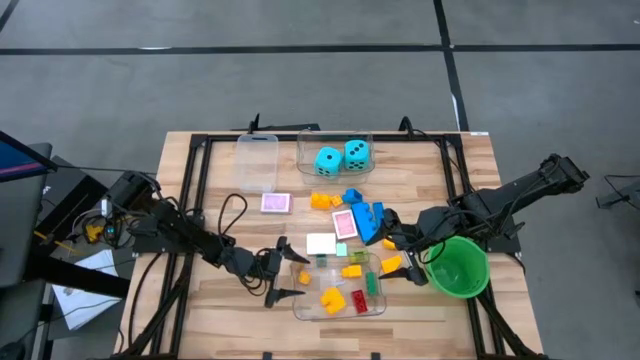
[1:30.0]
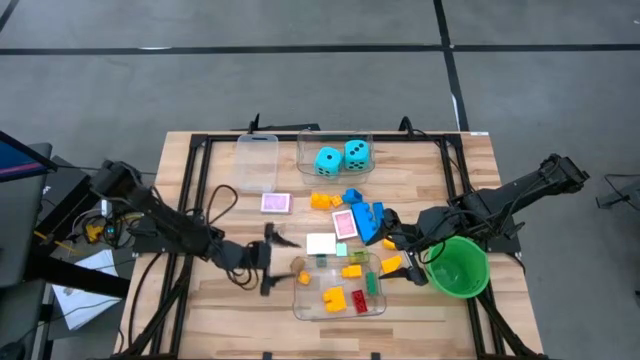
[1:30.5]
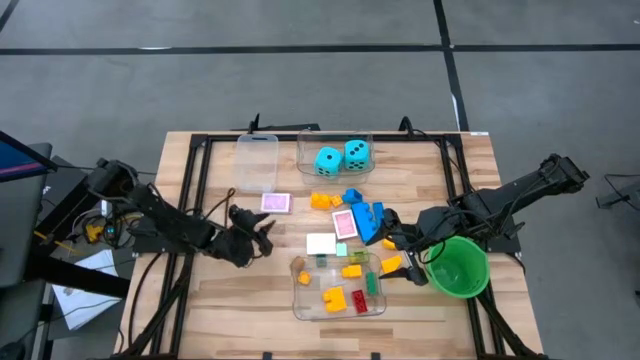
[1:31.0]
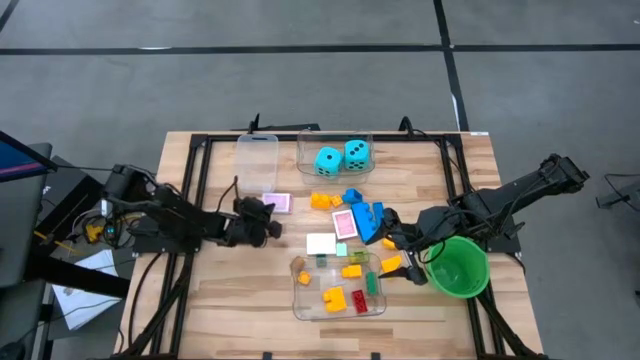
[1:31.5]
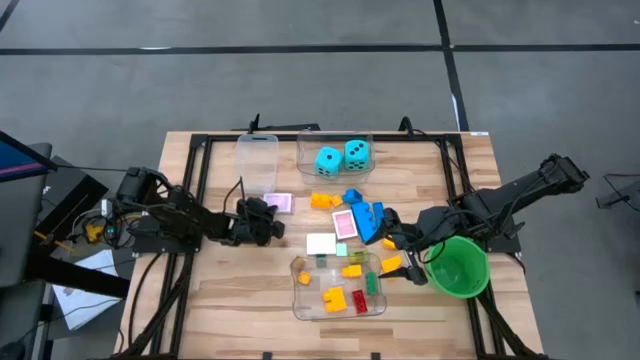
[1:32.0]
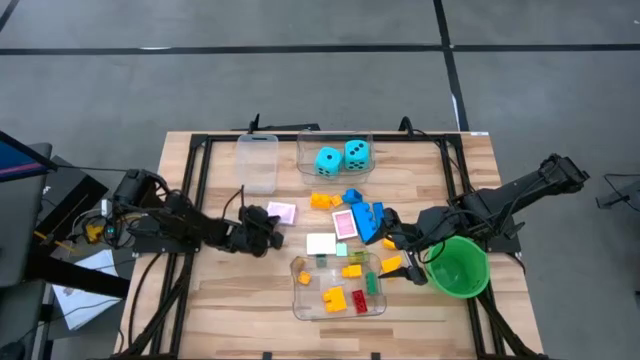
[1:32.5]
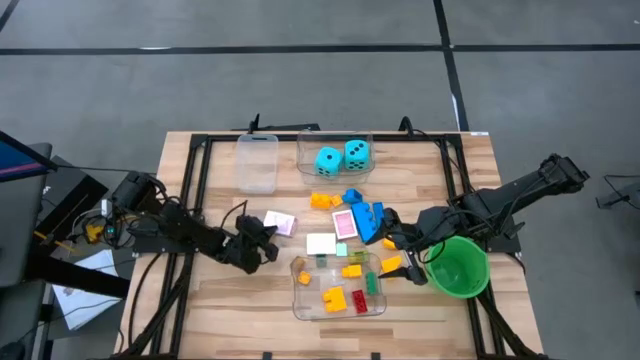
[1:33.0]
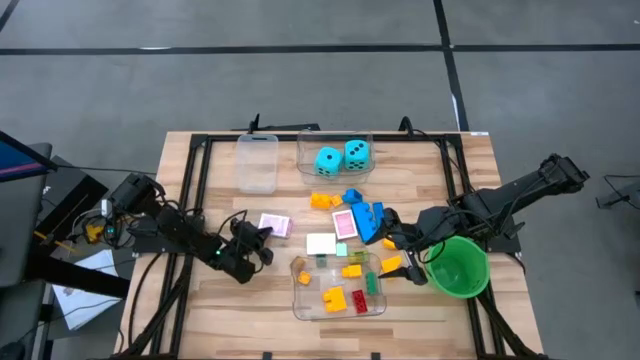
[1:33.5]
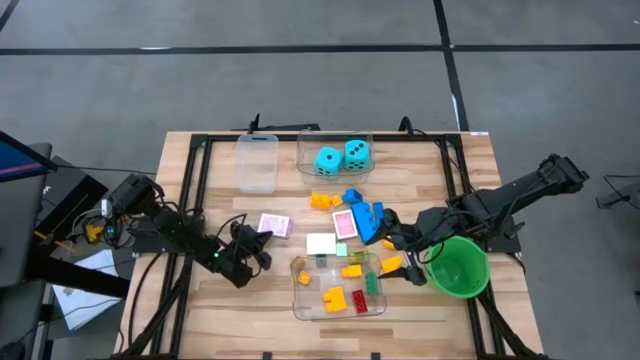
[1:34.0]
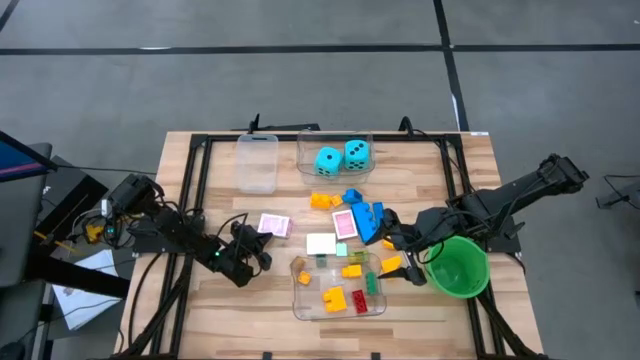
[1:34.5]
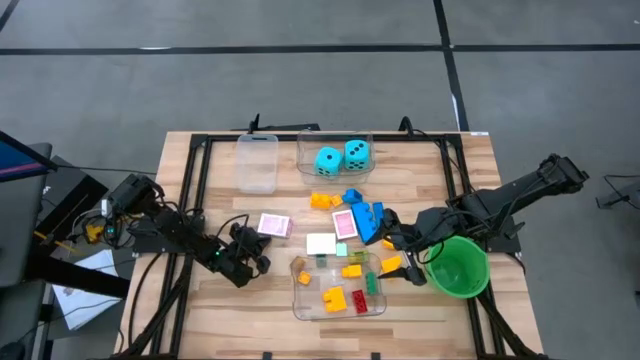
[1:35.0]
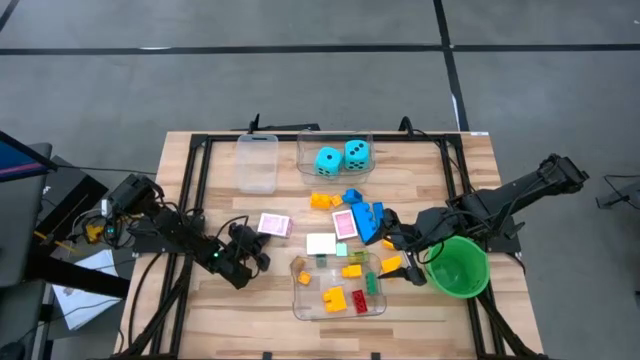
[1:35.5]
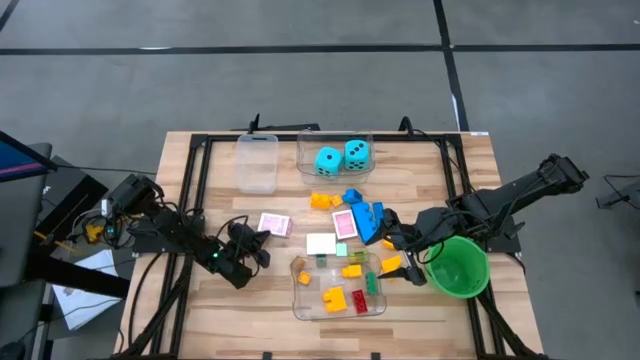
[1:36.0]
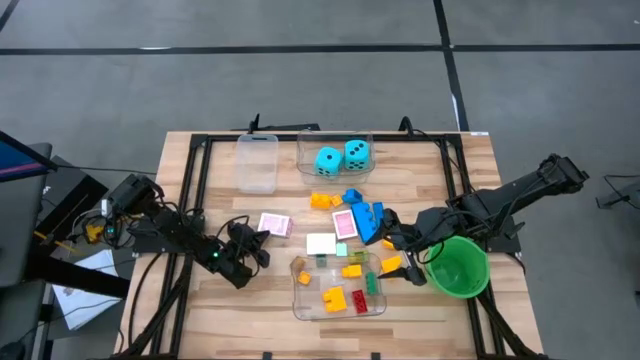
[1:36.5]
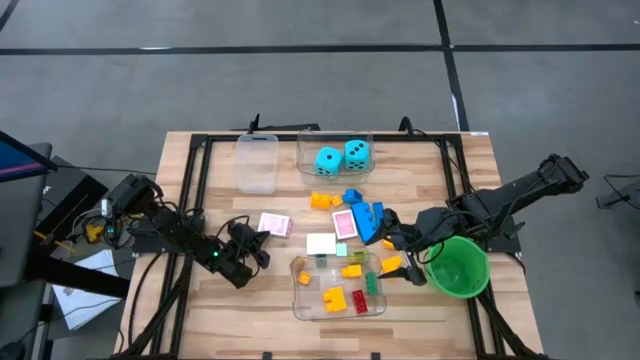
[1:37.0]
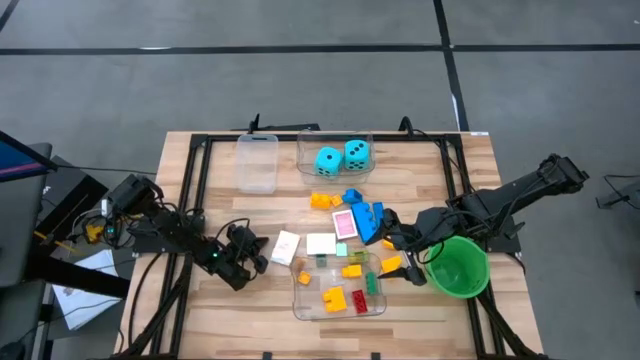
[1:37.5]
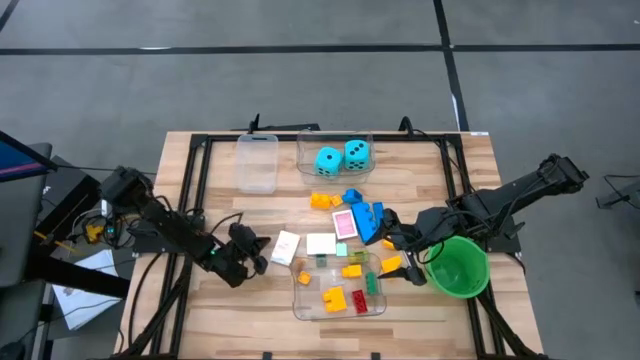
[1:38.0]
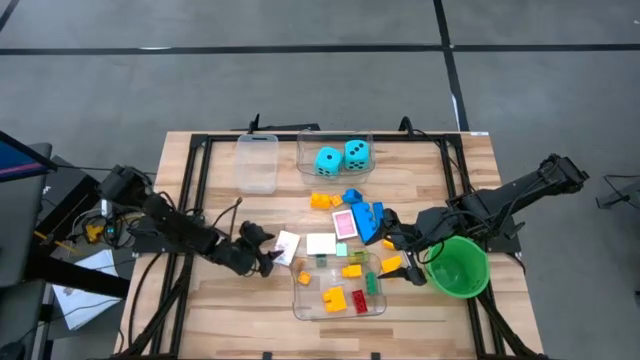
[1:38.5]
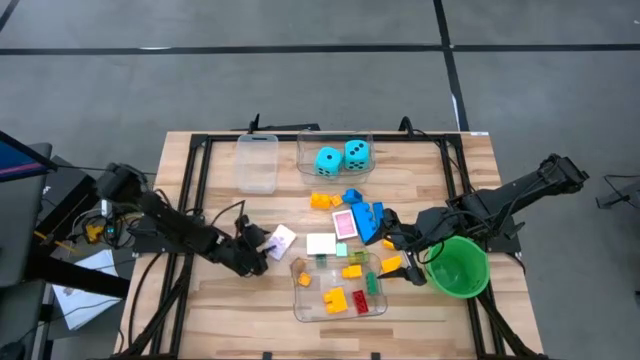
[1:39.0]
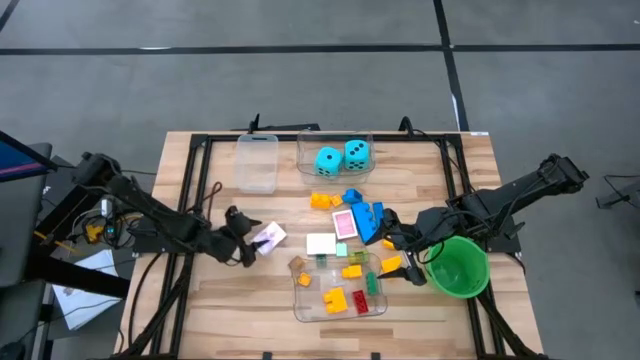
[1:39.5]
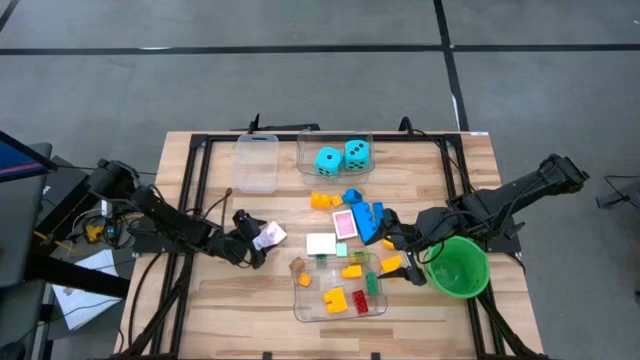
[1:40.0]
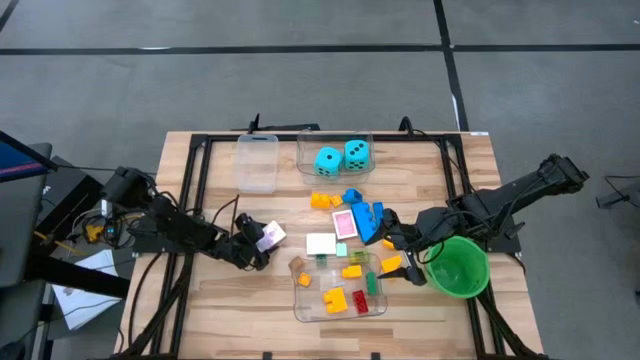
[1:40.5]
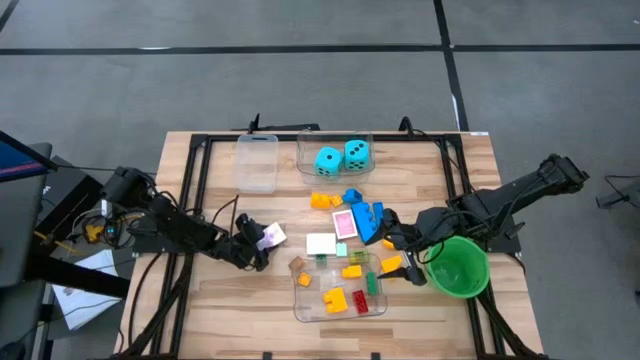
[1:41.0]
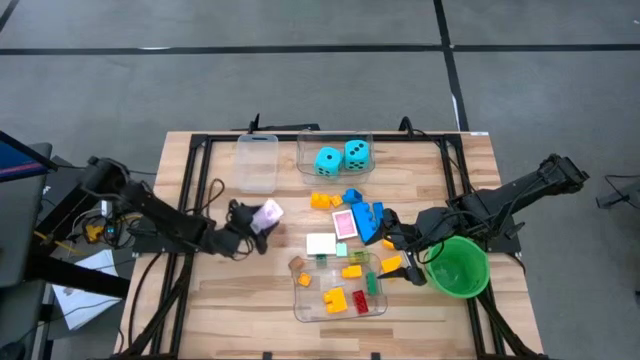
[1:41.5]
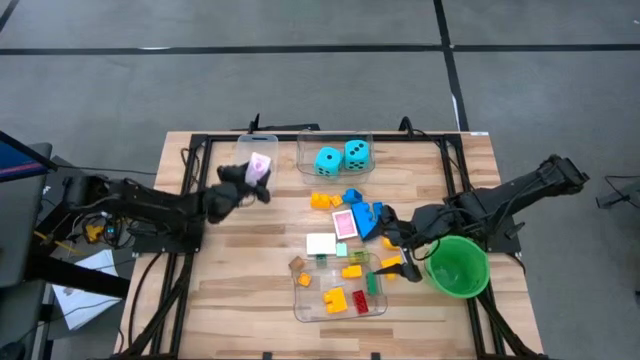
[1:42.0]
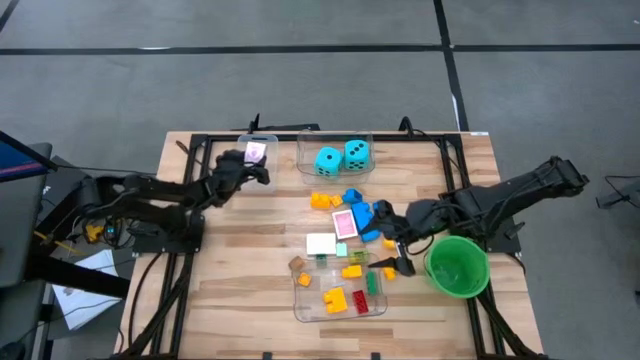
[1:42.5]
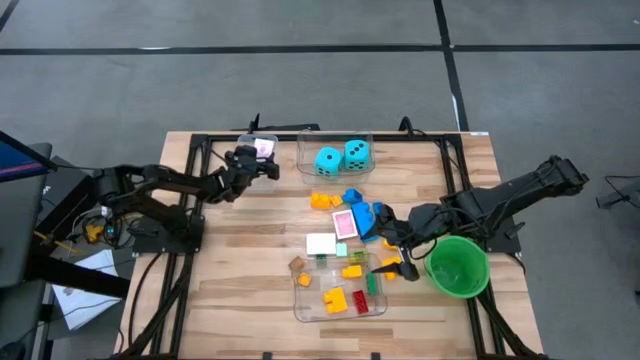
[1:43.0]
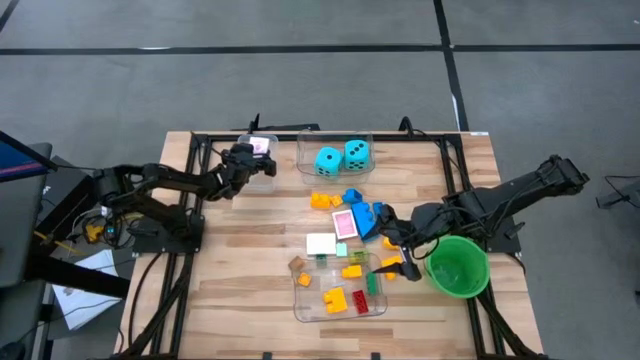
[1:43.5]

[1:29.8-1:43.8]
Task: Pick & Place Toys
Put the pink deck of cards box into the white bin

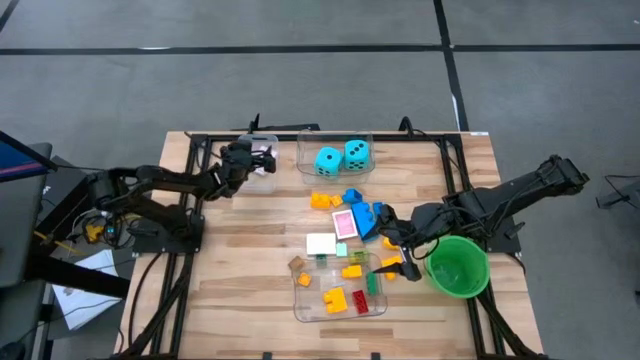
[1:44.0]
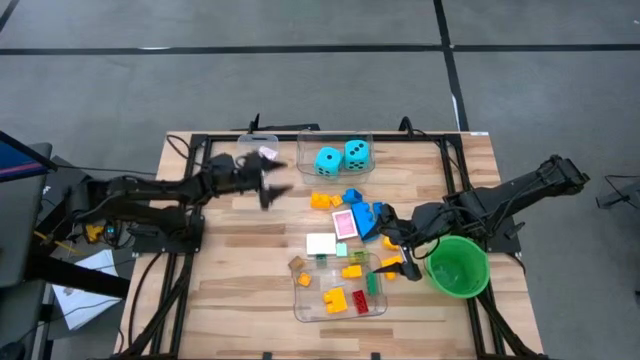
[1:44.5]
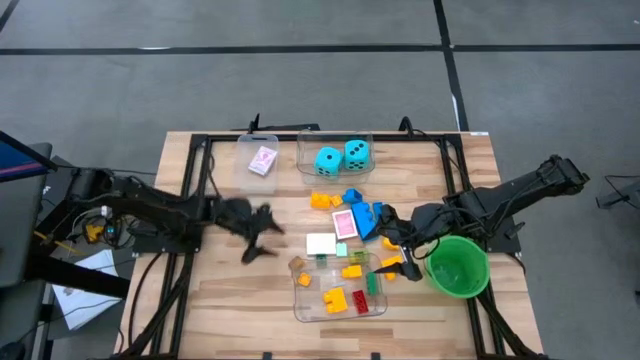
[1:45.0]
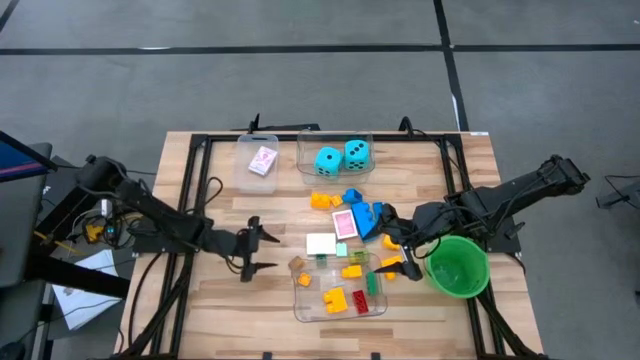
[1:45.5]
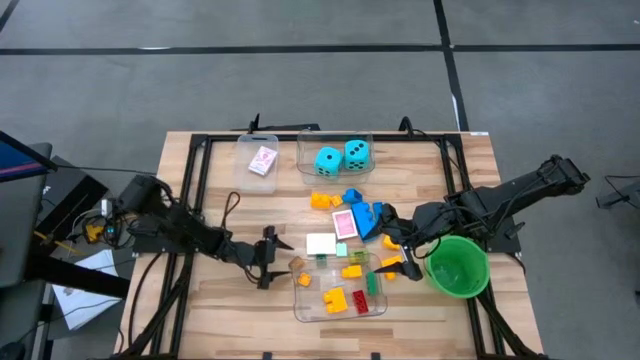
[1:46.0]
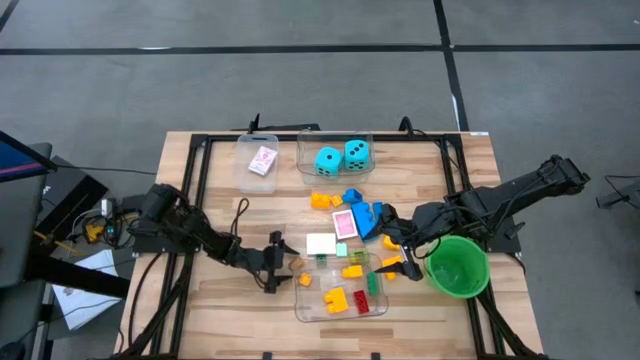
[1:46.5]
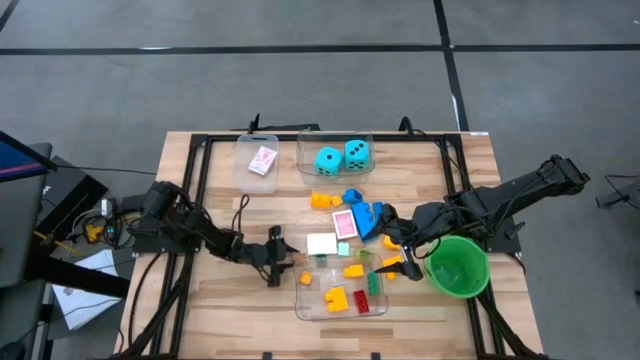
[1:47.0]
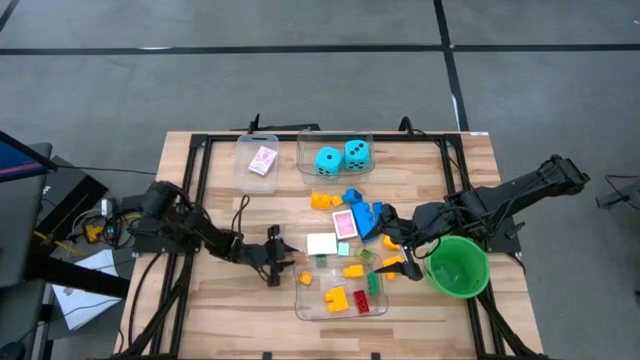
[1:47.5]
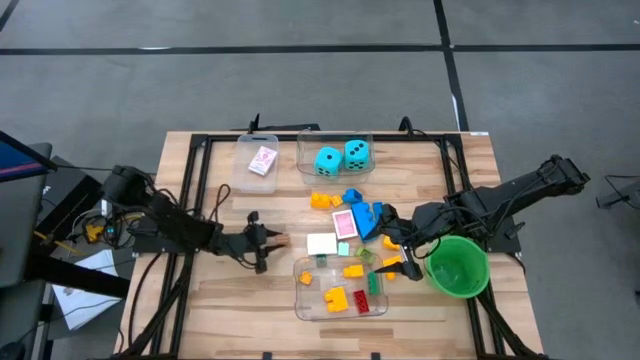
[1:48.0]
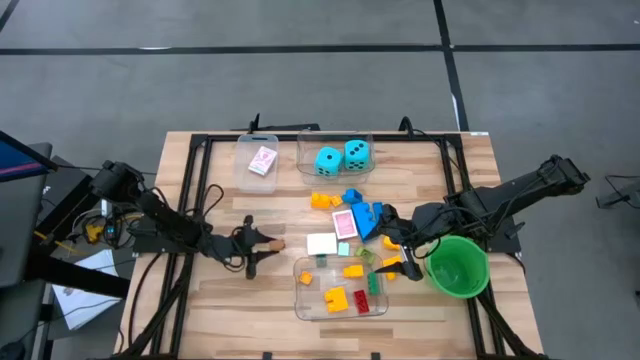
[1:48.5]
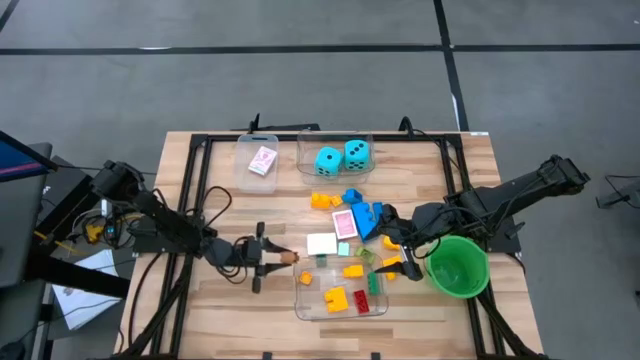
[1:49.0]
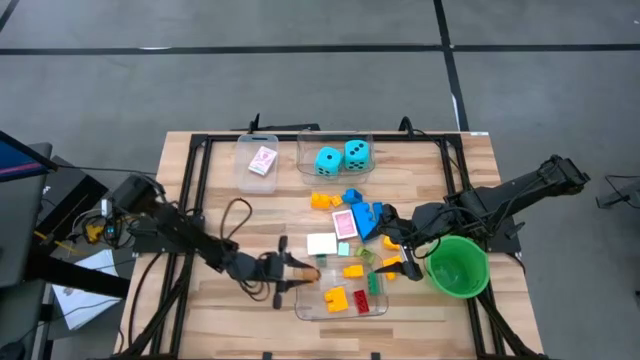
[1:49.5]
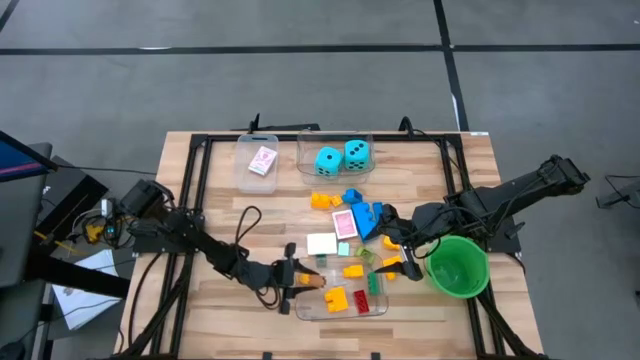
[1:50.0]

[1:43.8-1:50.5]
Put the brown game piece into the bottom transparent bin

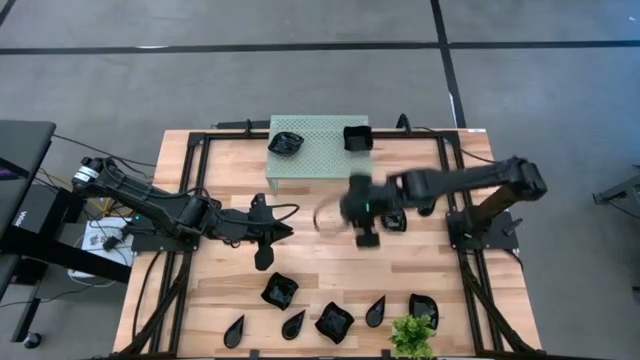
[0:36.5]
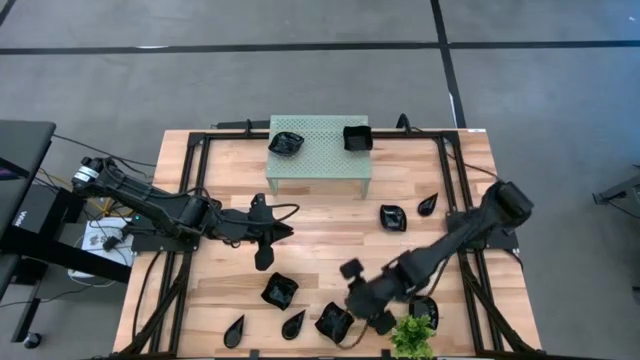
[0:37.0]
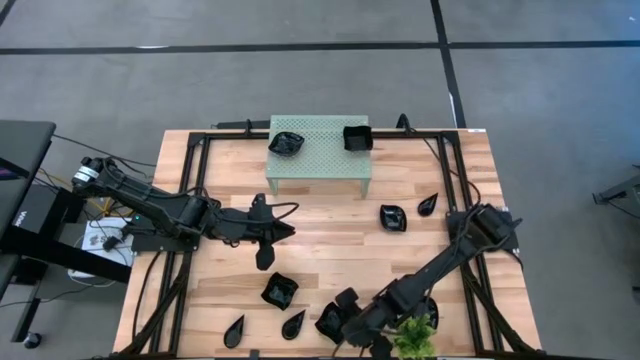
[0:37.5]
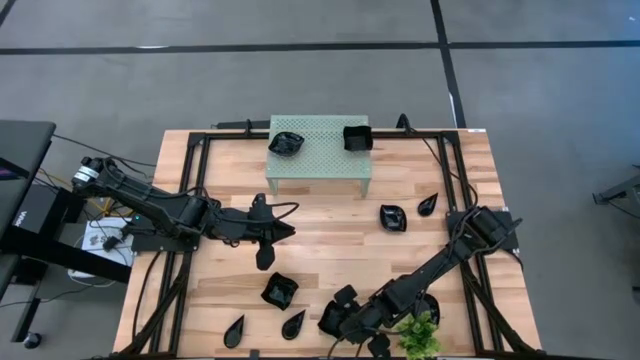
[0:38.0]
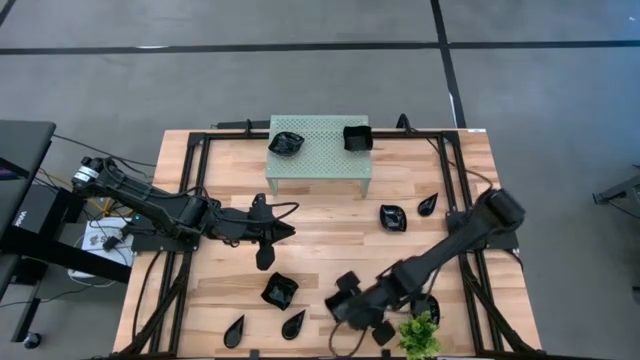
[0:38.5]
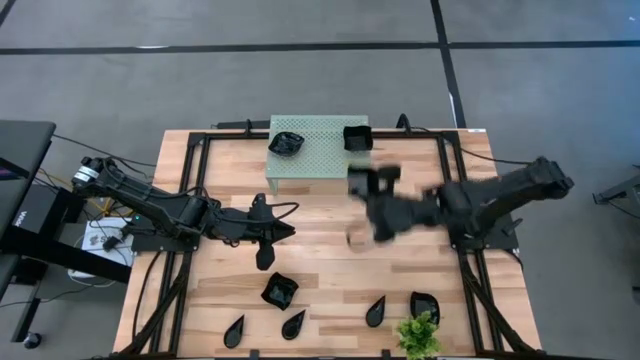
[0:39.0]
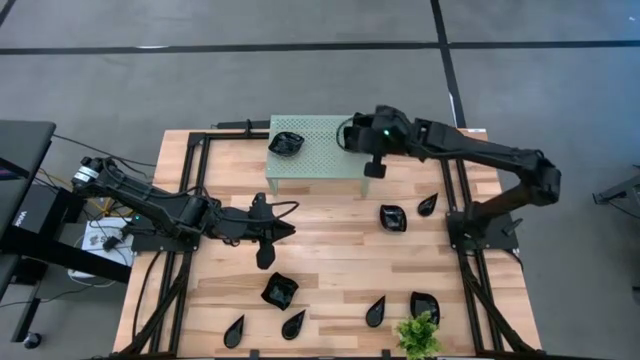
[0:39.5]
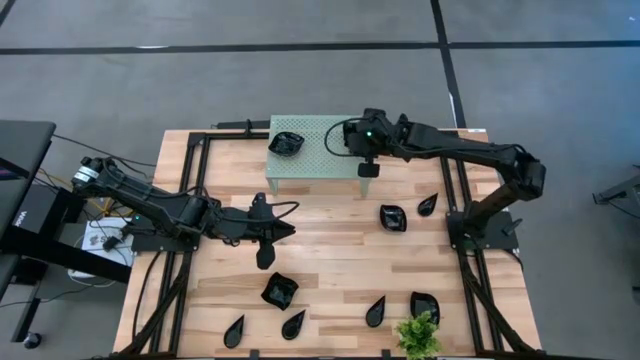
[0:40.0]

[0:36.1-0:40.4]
Task: Pick & Place Mini shaped plates
Stack the distorted square plate on top of the other distorted square plates on the shelf
